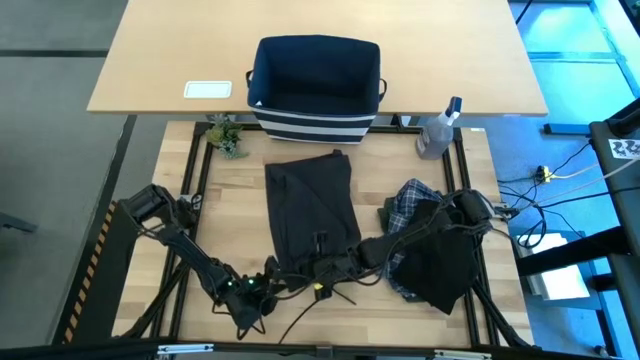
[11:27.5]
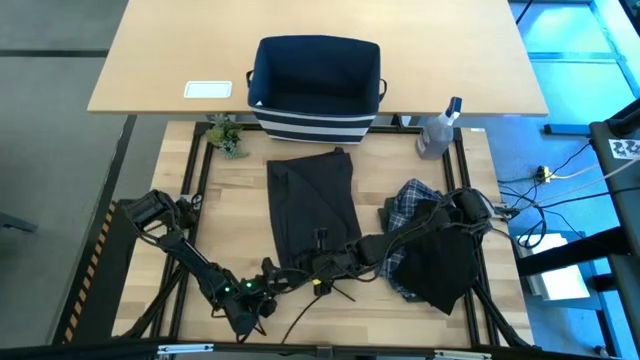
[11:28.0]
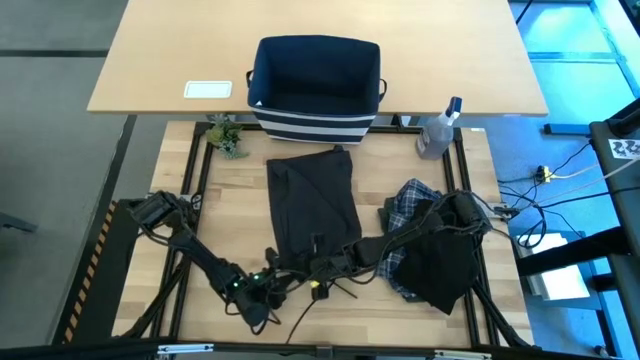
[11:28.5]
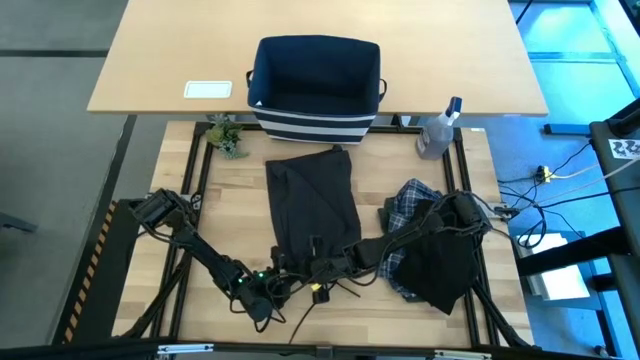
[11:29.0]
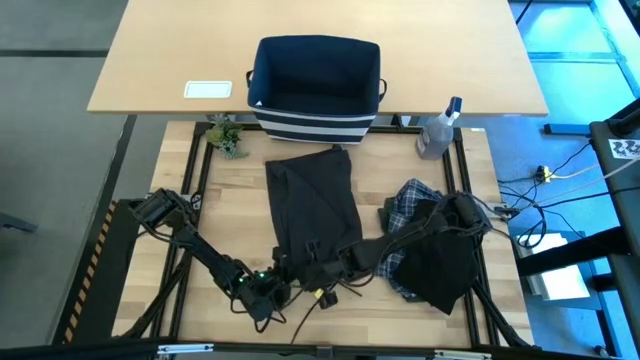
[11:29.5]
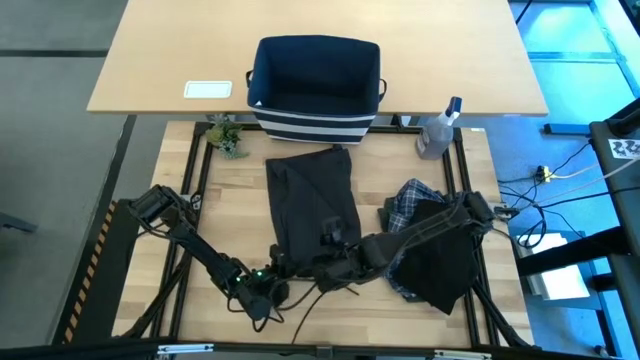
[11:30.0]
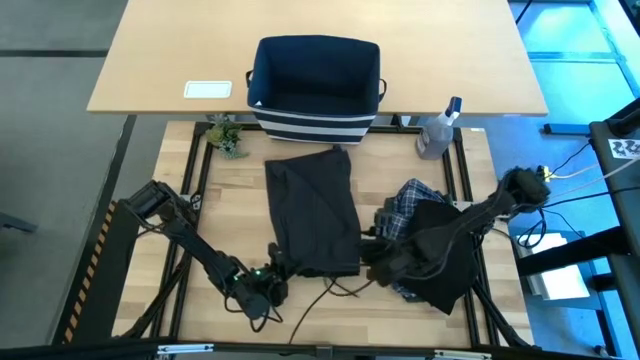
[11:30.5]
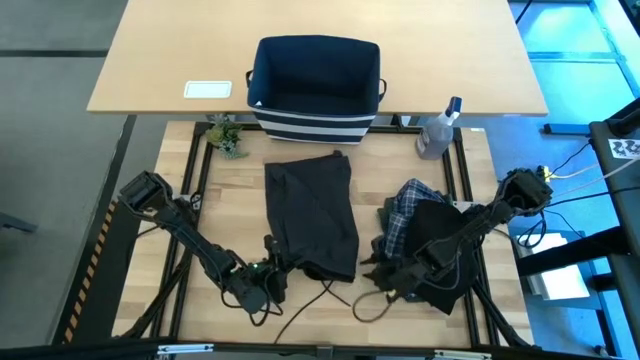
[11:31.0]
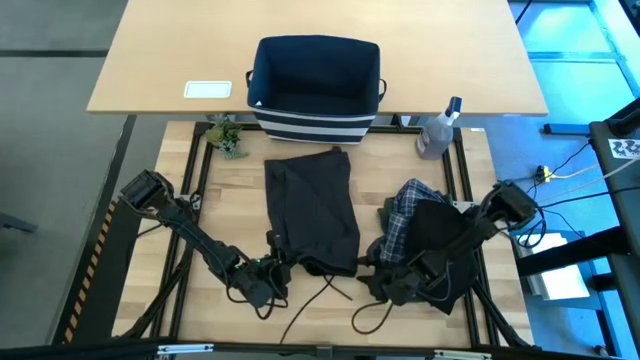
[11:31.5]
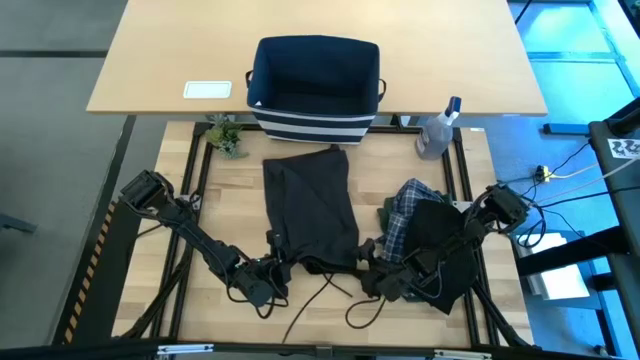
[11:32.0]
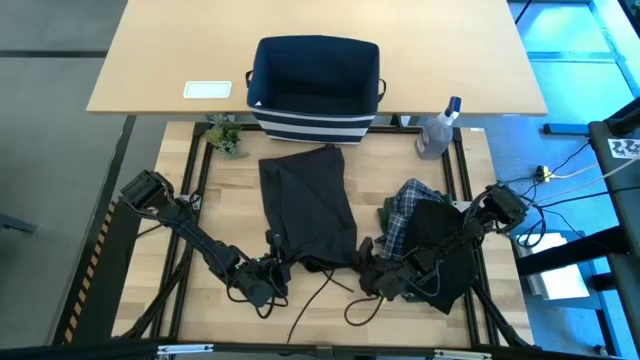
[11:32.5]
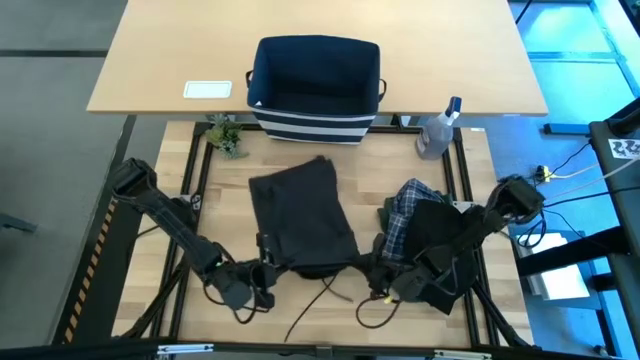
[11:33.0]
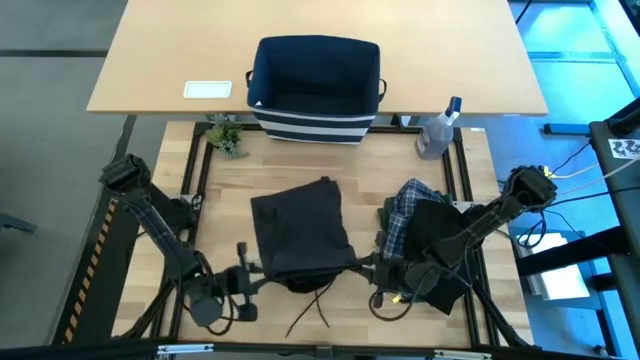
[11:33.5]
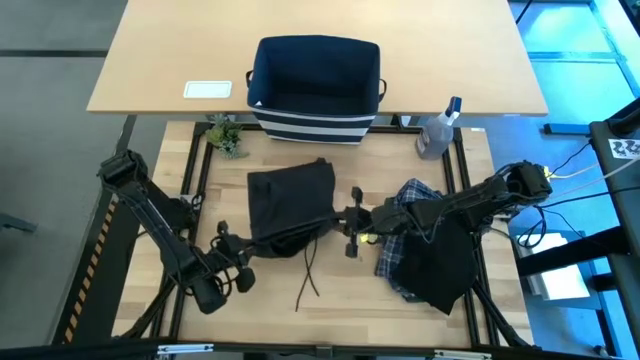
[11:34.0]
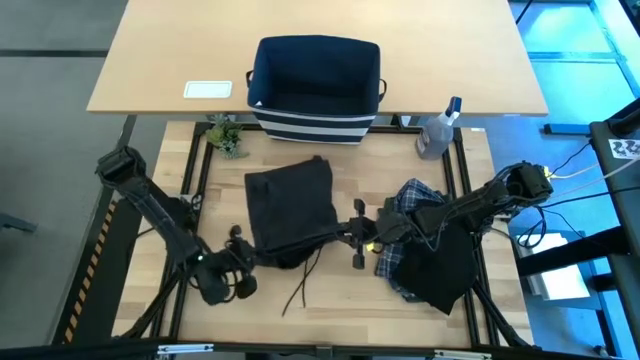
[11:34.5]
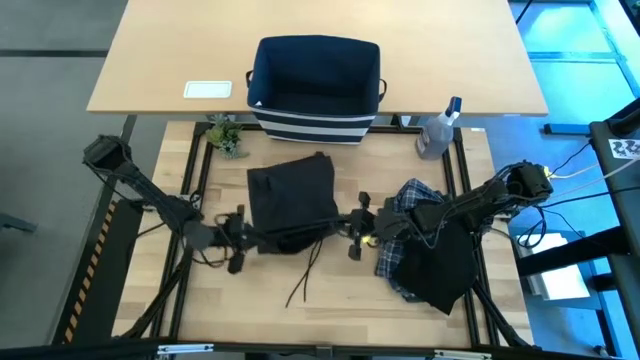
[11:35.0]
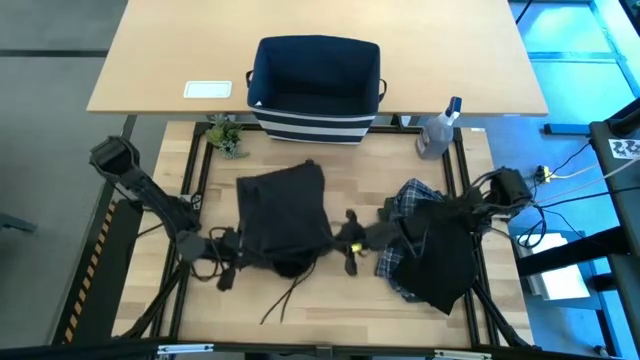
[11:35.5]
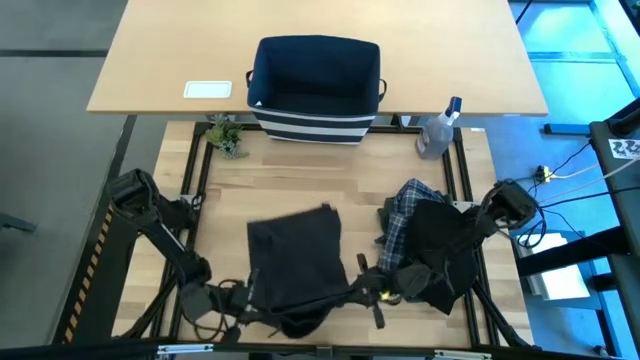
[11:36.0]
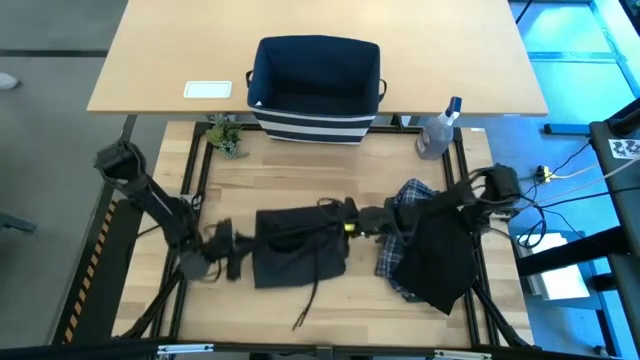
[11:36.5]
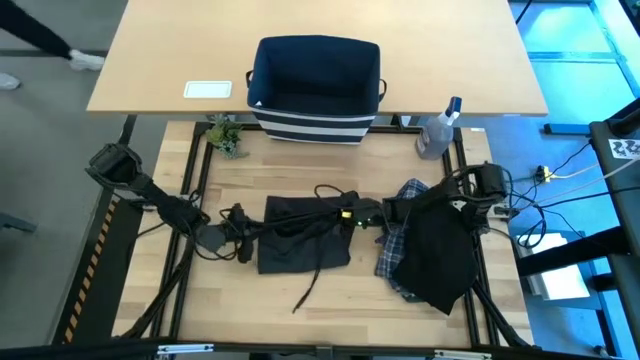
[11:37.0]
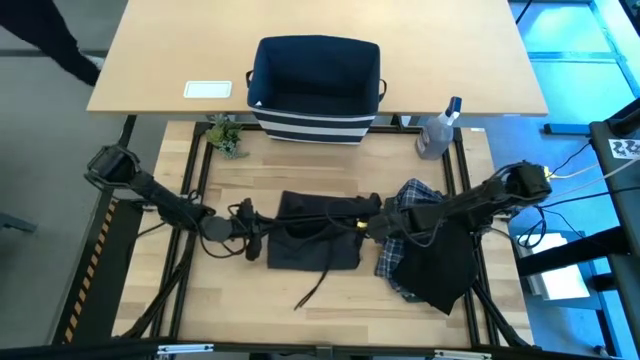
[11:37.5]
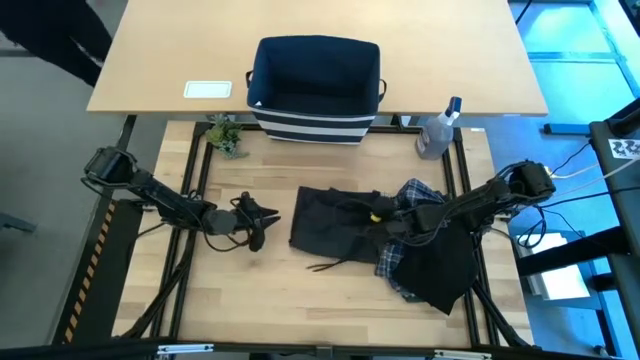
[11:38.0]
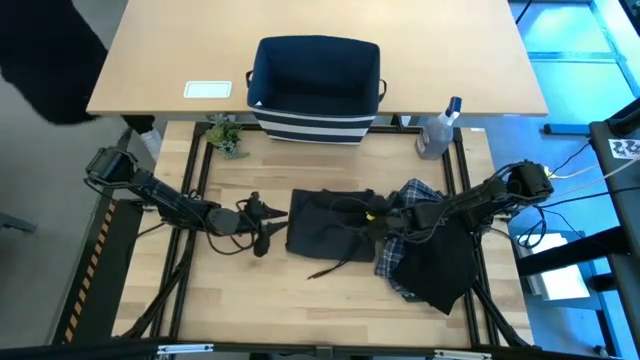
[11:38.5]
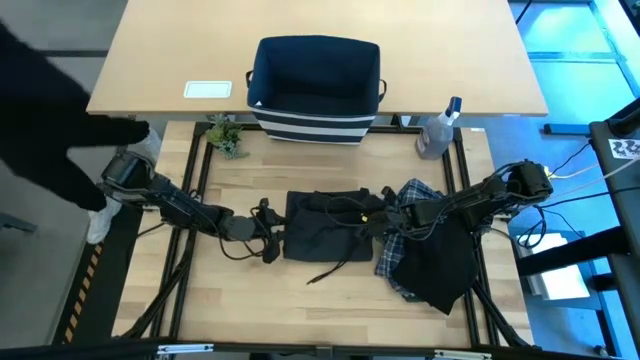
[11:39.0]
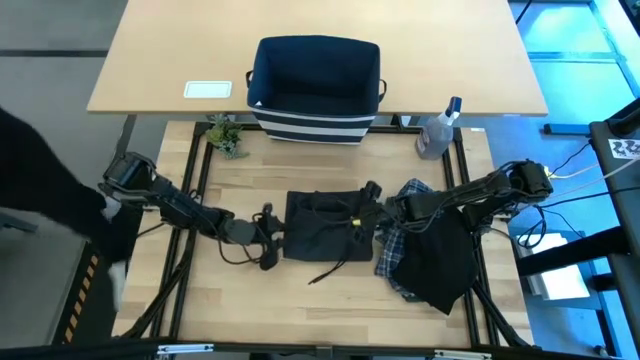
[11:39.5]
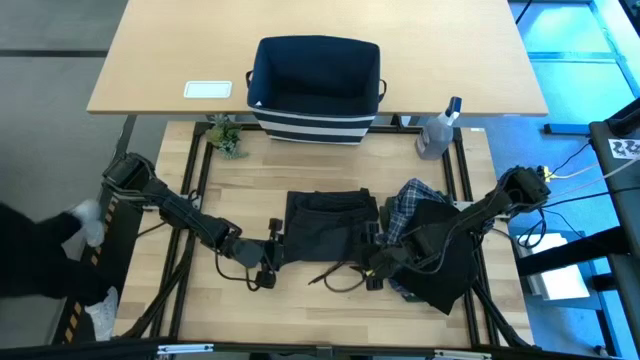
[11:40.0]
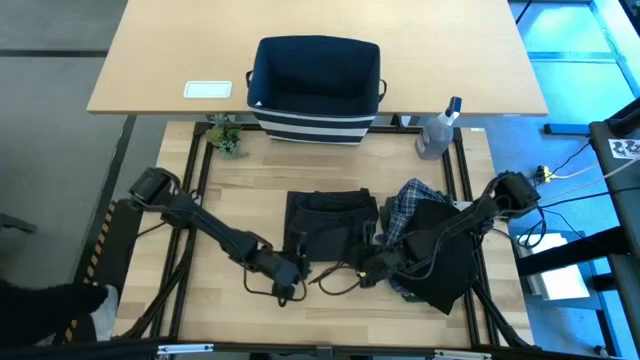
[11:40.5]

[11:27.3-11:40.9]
Task: Fold Laundry from Bin
Fold the black shorts

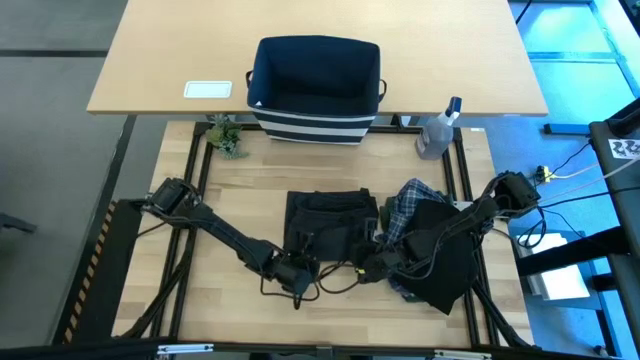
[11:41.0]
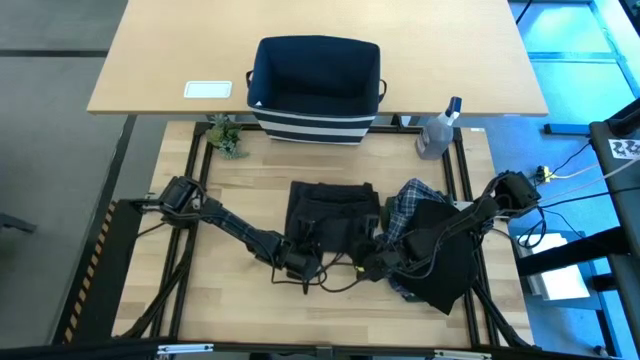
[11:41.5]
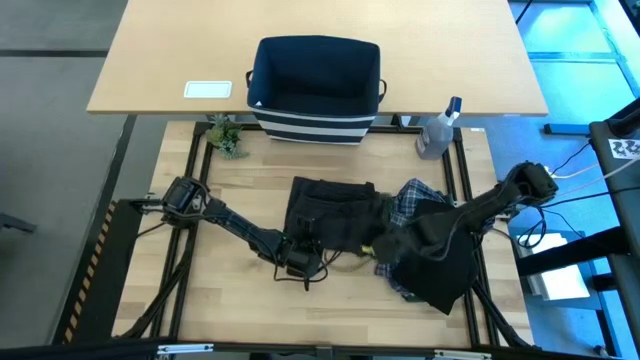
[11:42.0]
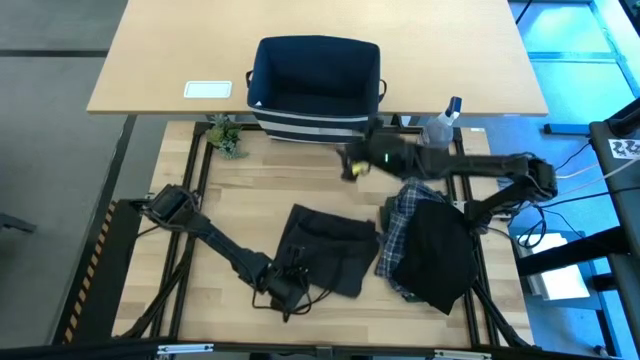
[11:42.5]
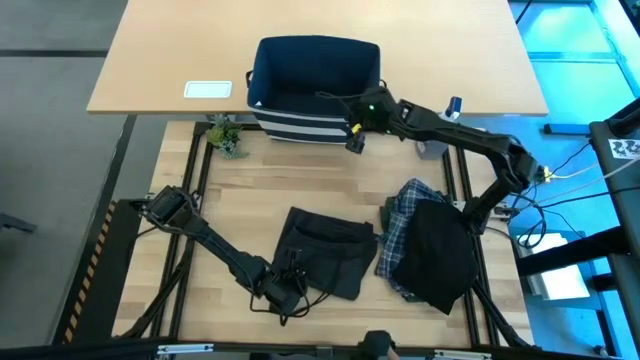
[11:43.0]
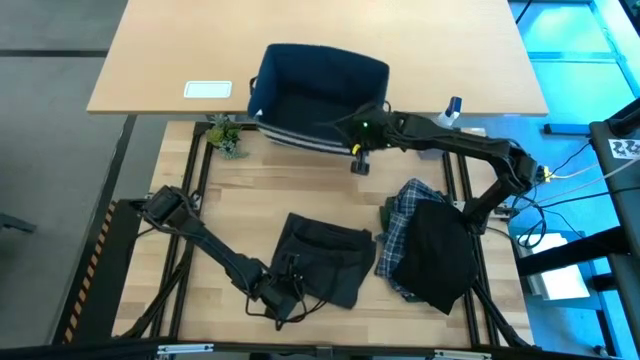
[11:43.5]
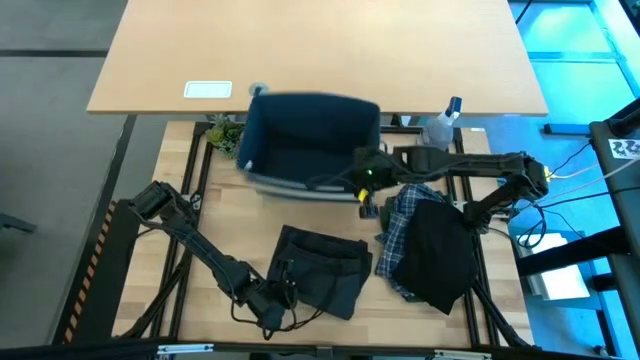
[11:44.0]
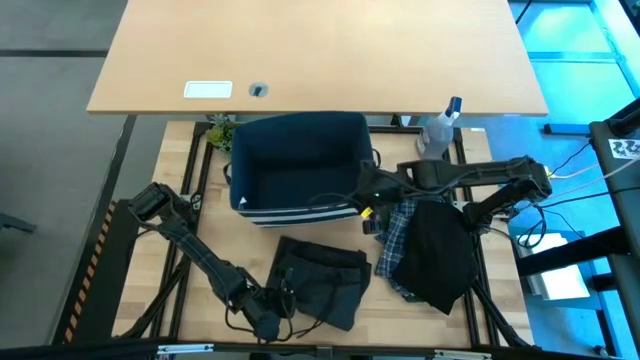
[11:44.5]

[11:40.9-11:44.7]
Move the laundry bin to the top of the table

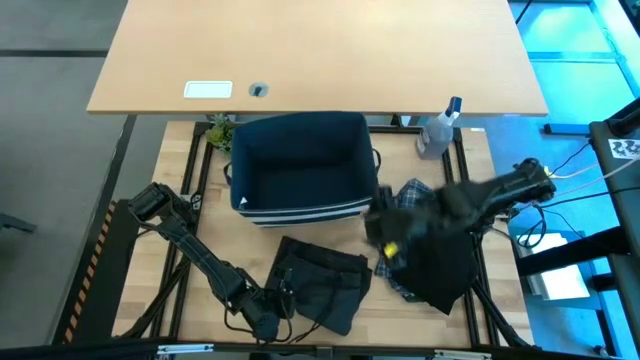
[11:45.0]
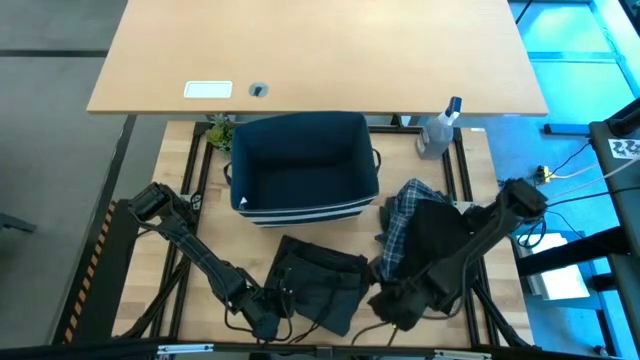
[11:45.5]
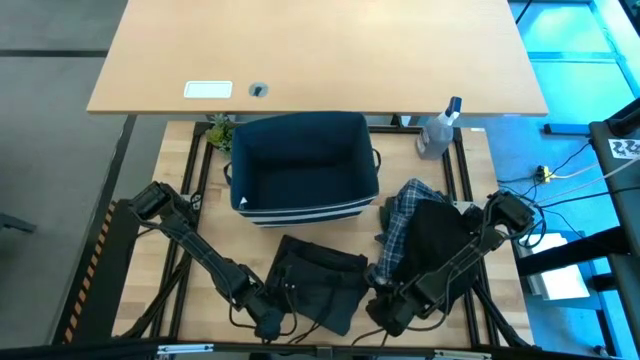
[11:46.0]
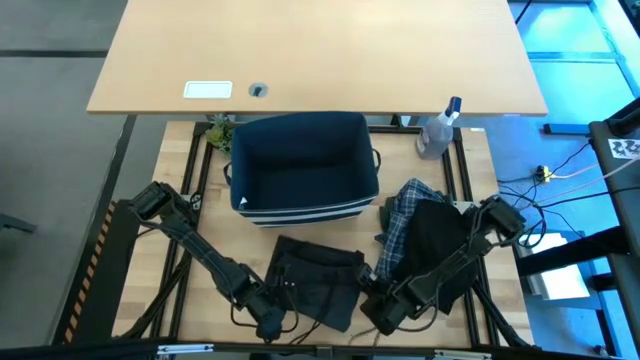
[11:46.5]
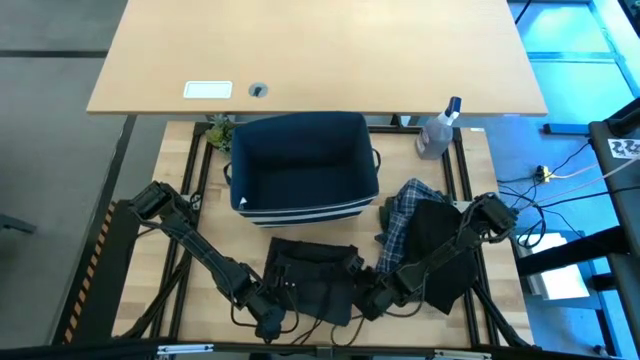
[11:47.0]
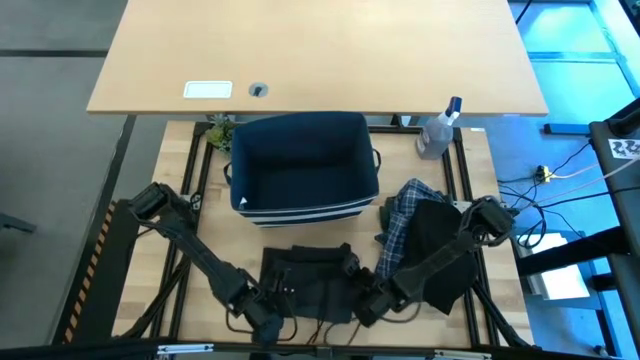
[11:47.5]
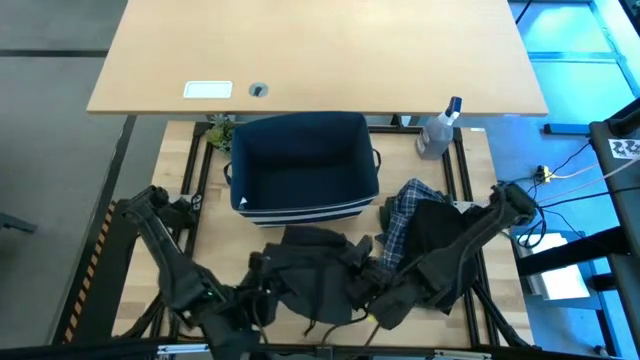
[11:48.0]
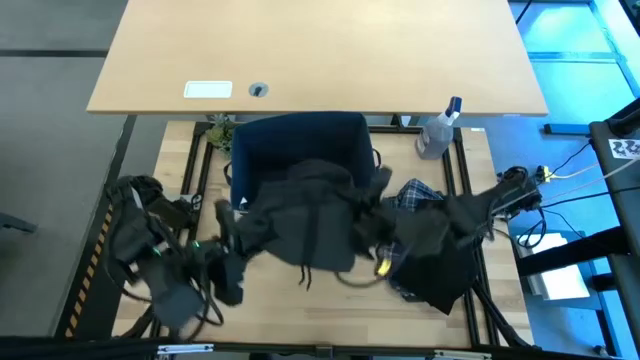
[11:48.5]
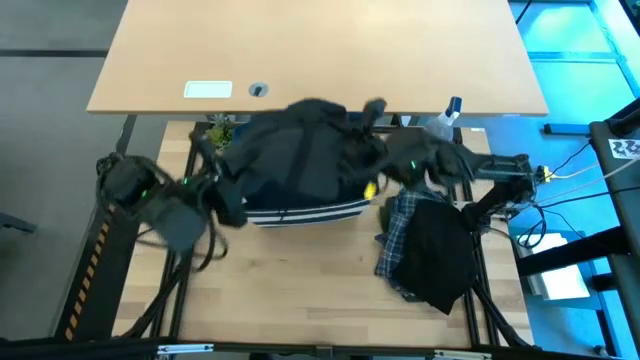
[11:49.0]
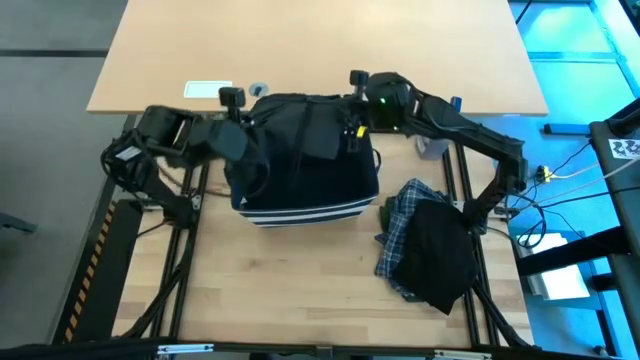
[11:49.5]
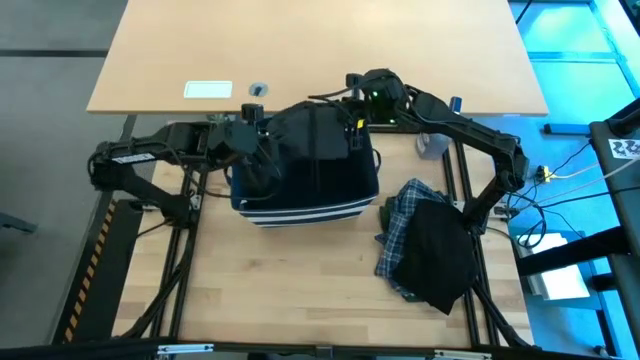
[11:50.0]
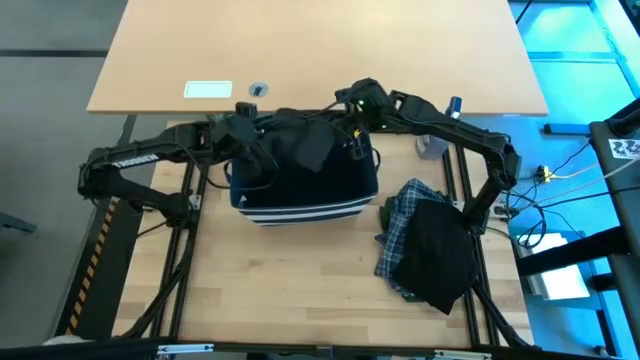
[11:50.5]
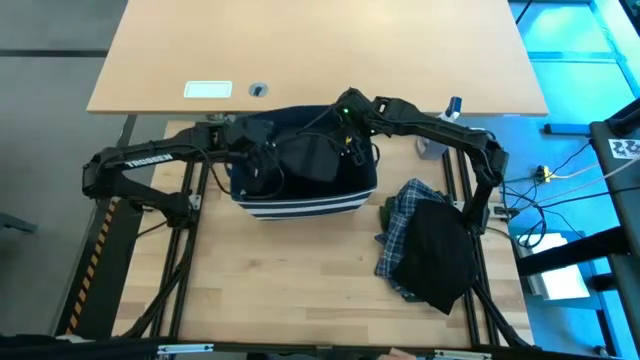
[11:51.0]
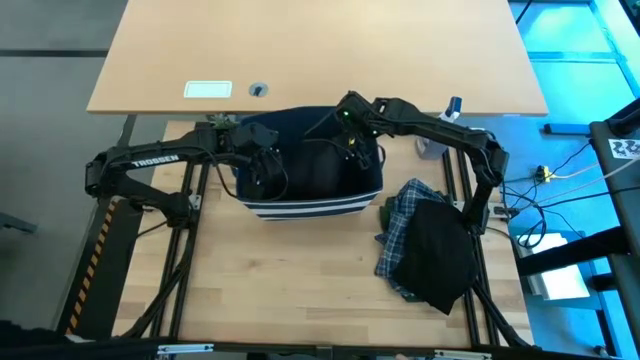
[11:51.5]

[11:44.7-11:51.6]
Put the black shorts into the laundry bin
